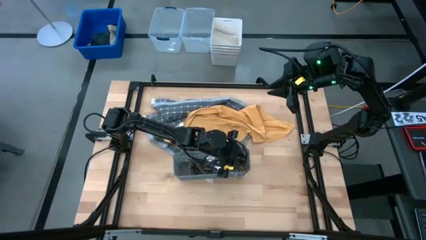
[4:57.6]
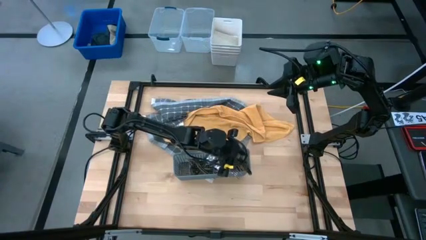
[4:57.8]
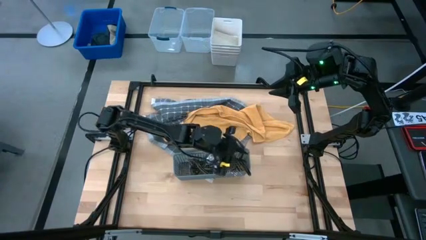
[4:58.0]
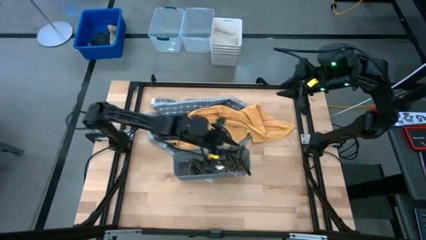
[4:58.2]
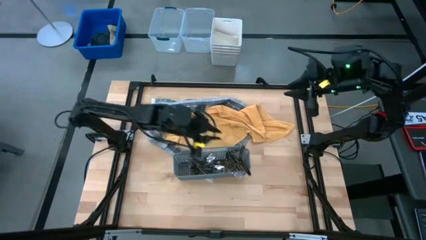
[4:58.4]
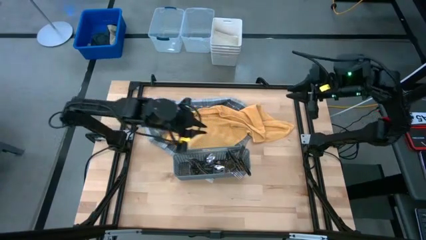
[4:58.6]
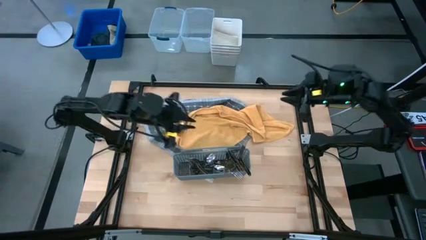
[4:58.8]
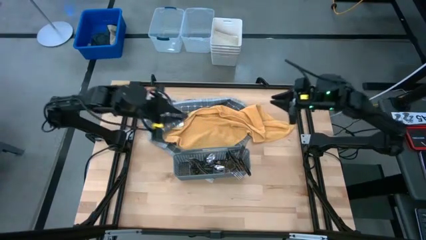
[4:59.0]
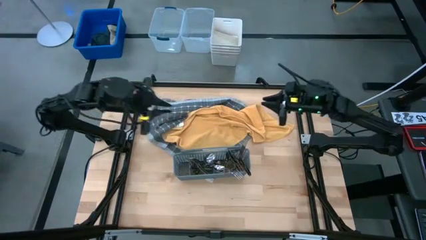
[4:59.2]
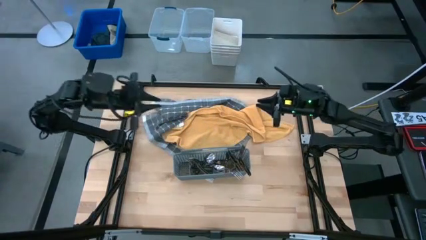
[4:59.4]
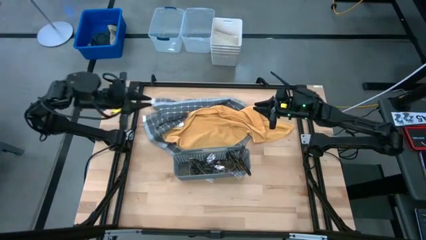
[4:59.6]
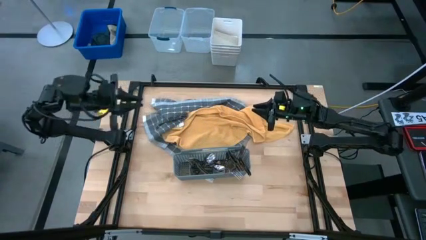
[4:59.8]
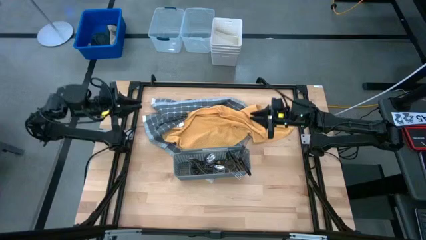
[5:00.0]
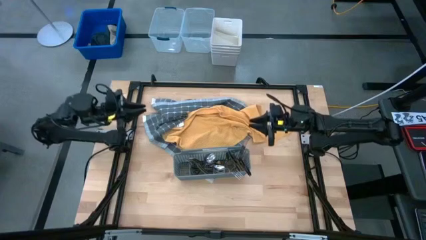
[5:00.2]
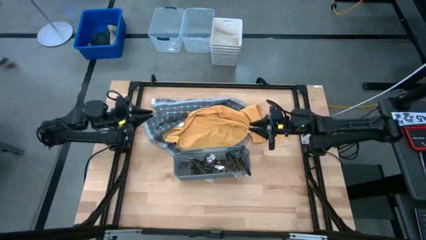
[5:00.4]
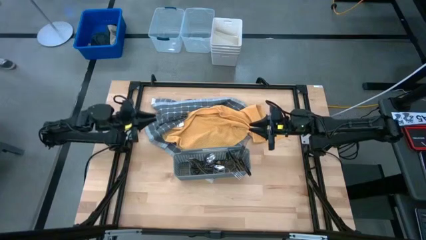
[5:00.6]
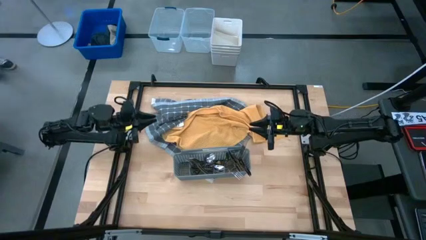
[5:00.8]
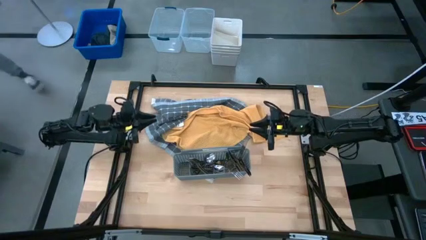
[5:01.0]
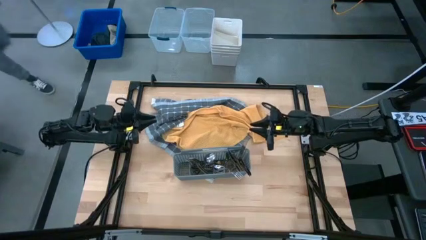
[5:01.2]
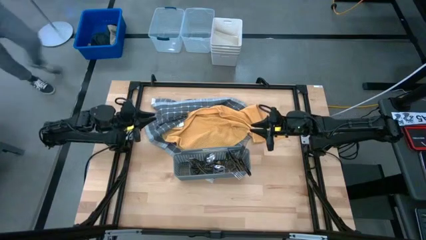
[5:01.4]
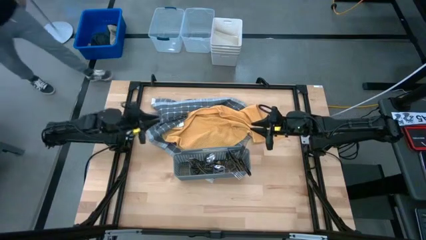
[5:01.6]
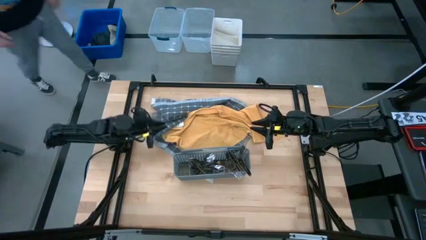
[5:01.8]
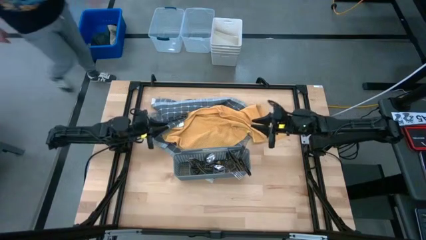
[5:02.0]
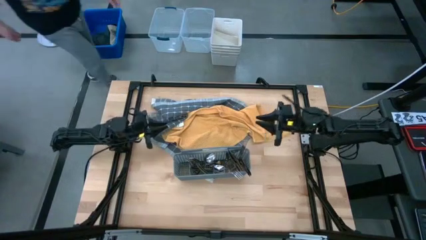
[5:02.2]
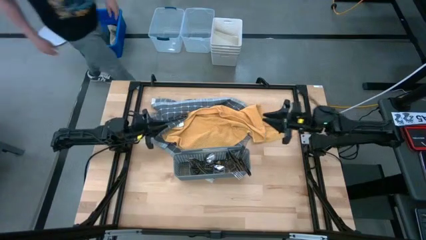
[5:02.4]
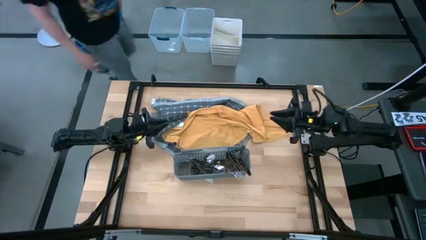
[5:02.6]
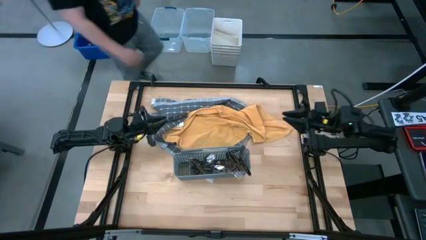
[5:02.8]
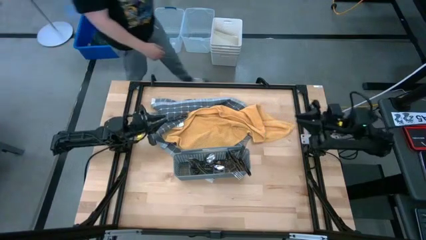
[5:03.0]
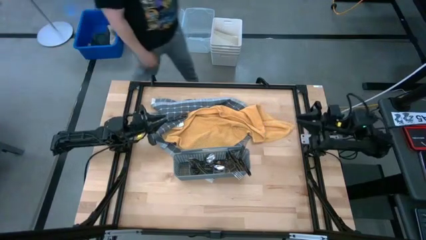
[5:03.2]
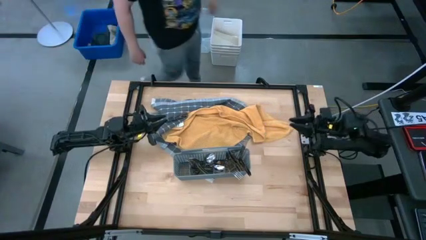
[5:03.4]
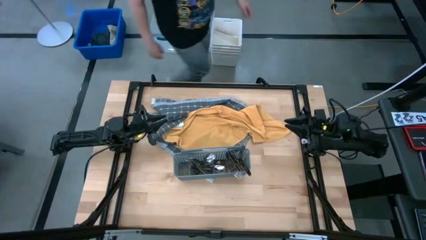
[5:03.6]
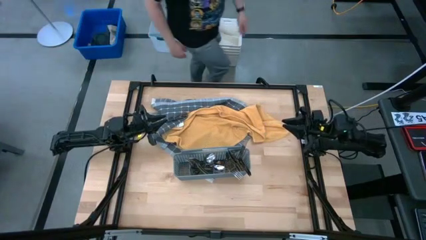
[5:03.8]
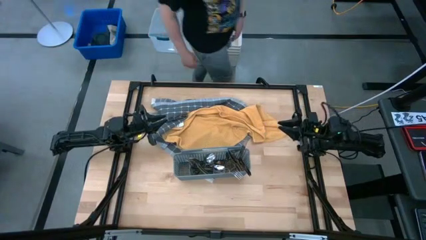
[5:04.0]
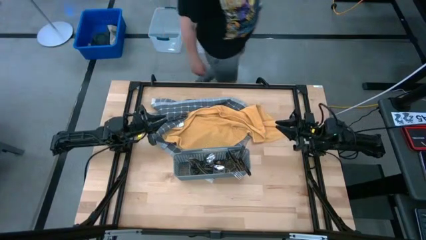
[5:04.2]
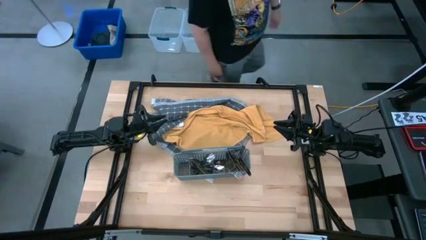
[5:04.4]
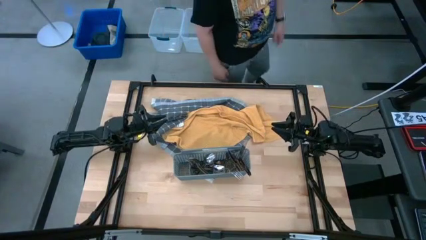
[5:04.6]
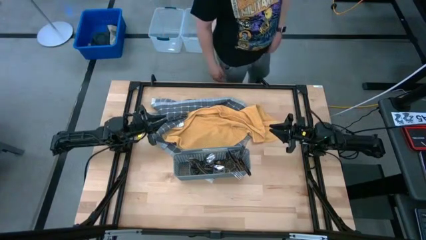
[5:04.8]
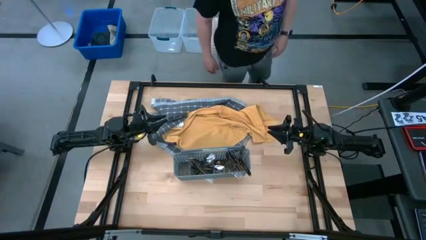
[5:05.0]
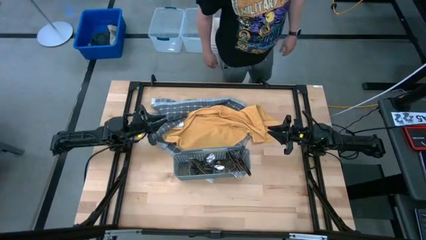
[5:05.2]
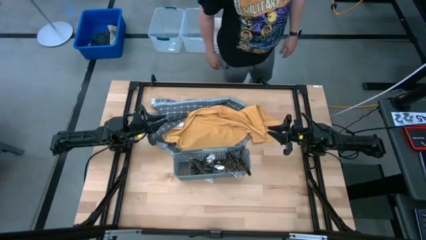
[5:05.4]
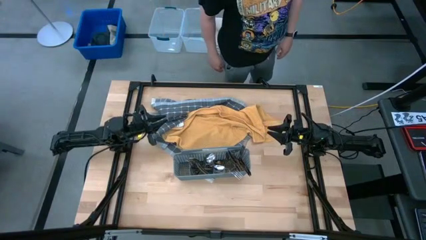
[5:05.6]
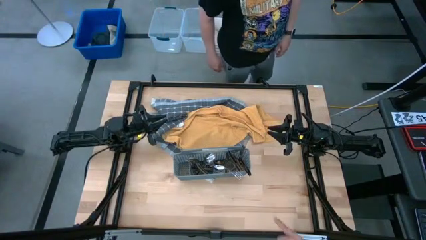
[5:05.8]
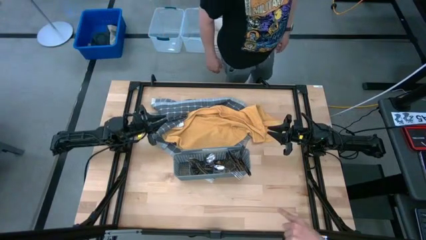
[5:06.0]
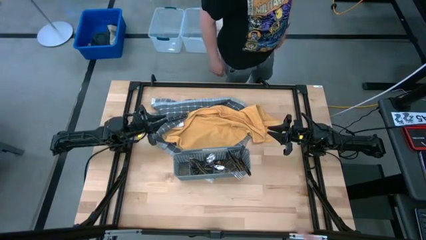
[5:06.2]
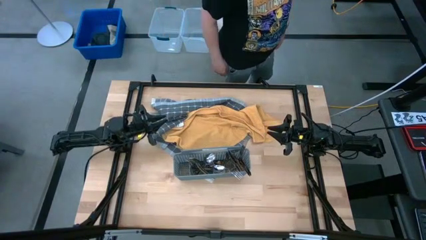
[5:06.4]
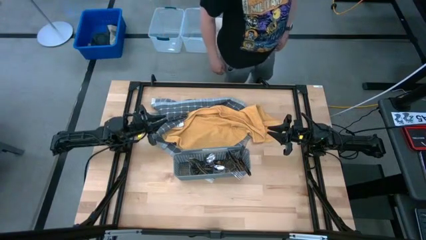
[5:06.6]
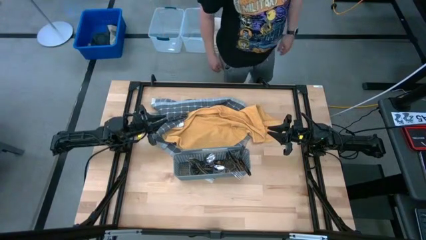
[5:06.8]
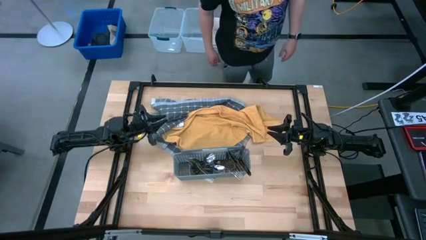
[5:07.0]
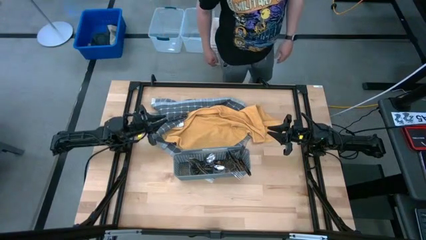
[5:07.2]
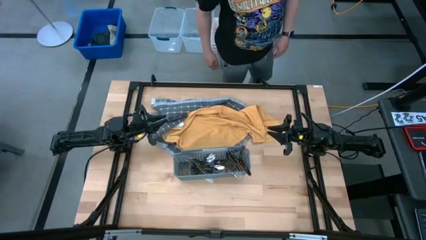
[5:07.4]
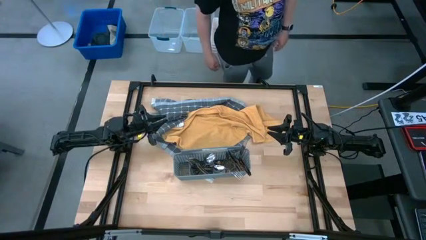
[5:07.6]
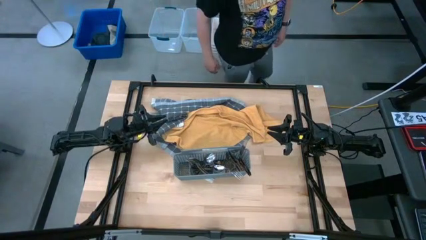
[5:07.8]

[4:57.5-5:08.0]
Task: Sort silverware
Return to Home Position

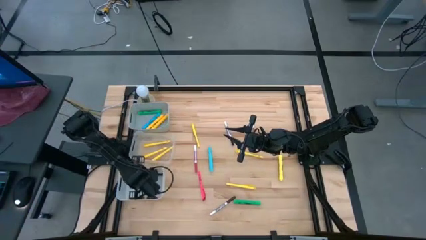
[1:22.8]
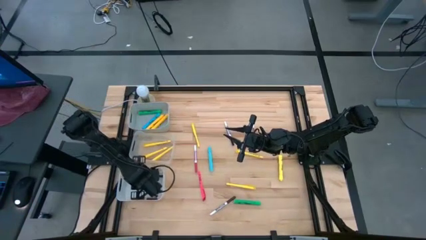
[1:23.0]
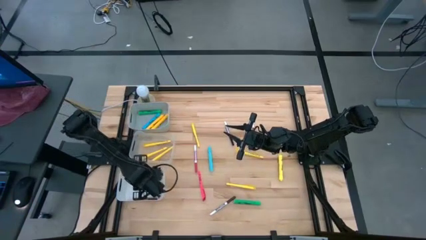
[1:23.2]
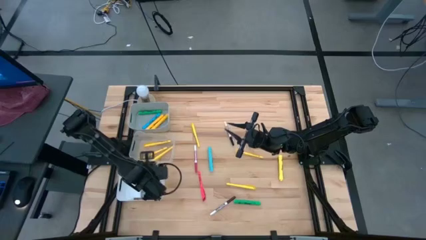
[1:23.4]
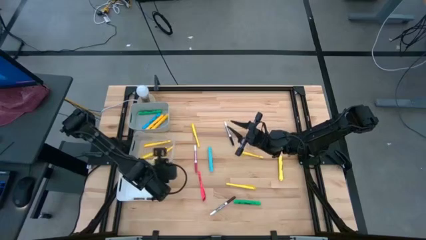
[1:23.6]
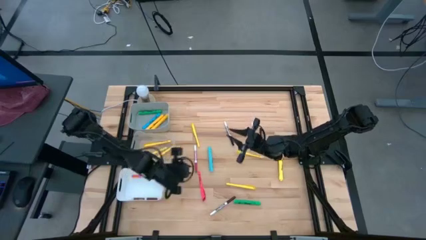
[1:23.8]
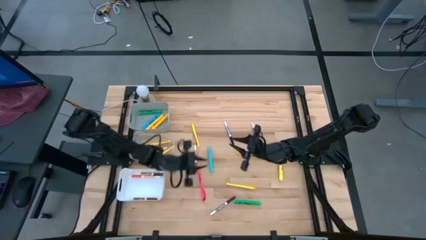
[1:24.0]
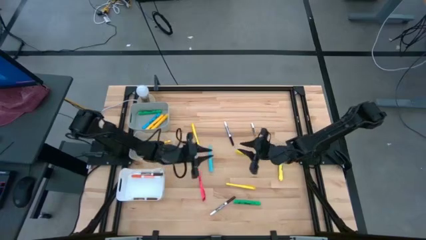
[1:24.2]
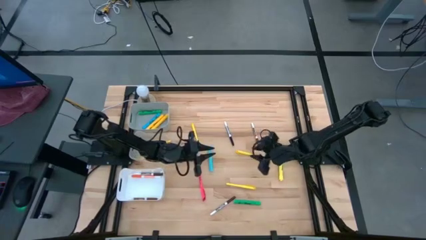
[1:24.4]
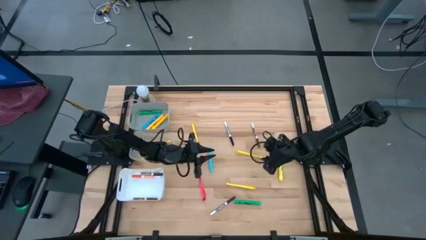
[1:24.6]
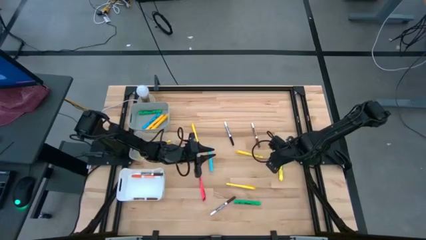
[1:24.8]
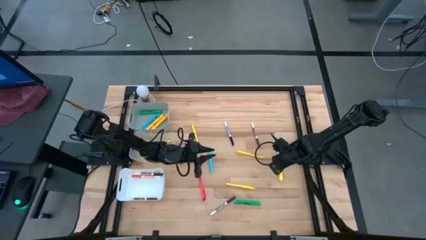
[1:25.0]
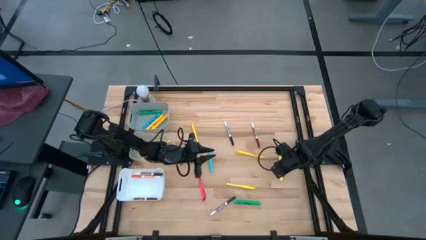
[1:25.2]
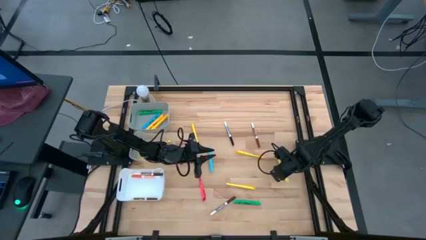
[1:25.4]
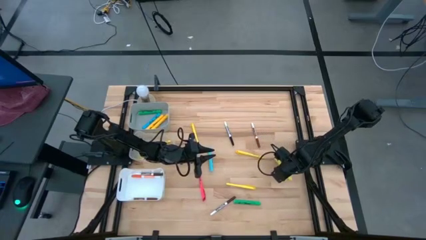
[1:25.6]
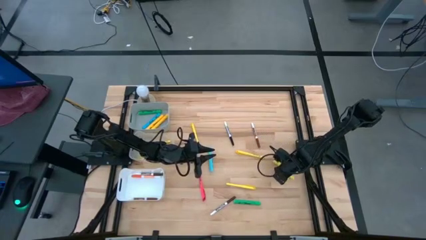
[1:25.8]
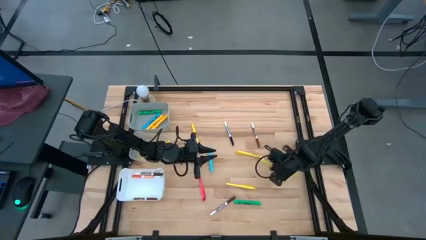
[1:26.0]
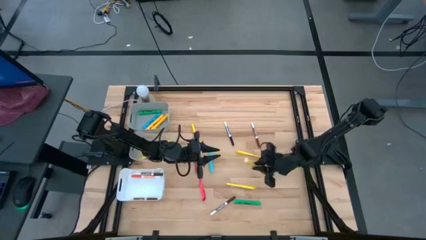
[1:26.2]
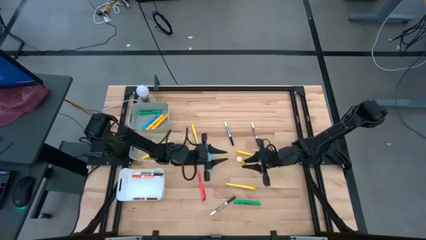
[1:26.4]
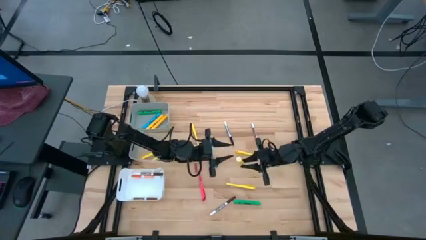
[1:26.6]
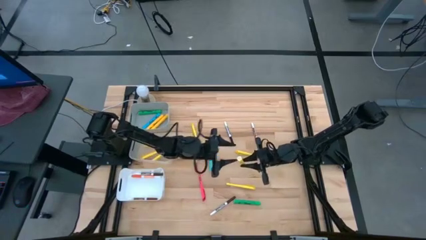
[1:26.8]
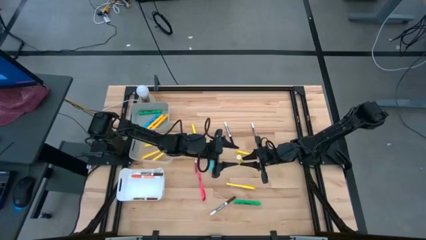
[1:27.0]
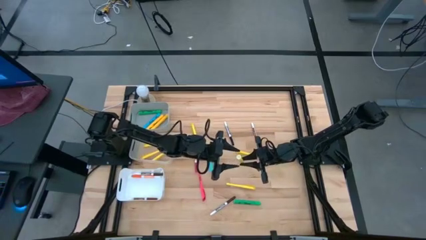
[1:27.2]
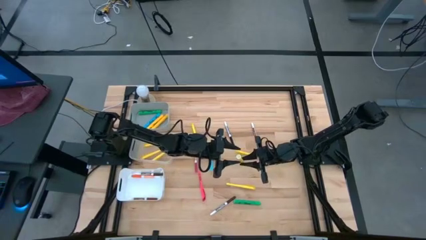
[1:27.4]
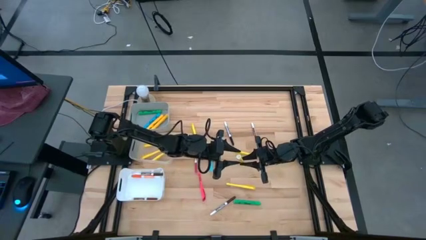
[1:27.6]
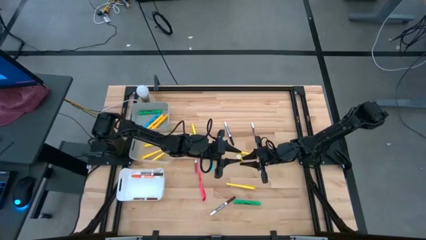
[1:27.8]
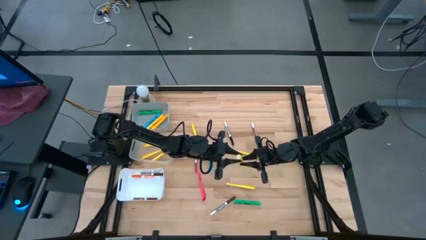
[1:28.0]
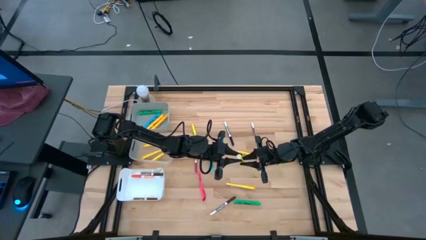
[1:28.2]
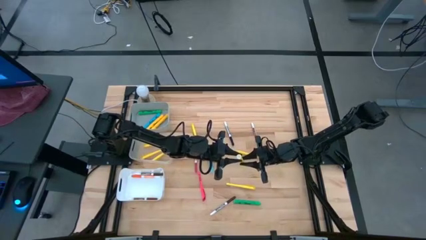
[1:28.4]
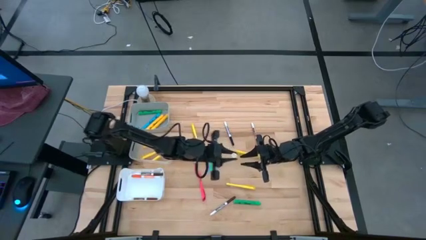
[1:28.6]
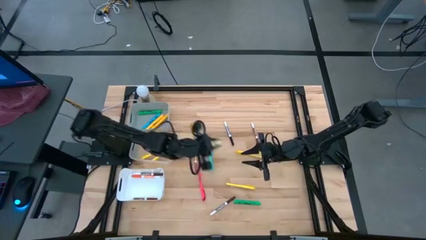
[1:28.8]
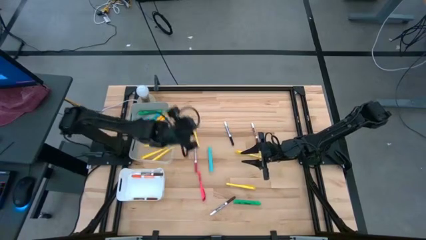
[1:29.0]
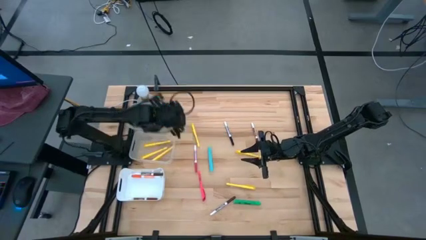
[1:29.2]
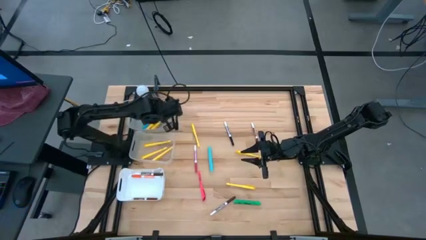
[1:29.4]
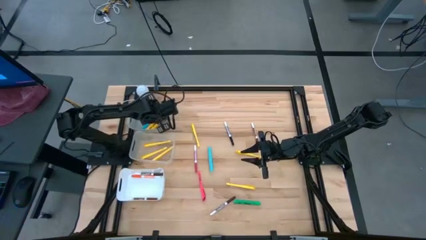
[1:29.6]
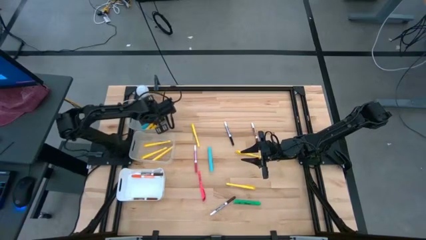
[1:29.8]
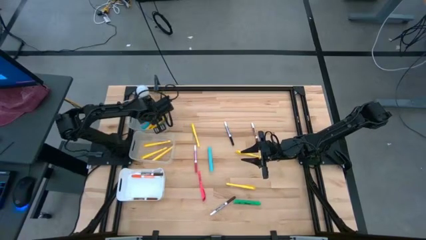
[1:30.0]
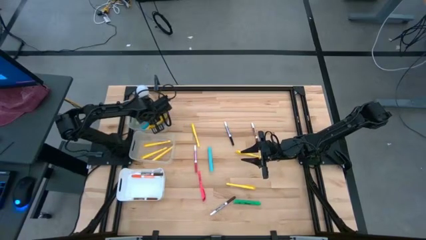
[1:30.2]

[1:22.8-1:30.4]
Task: Pick & Place Markers
Put the yellow highlighter into the gray bin
